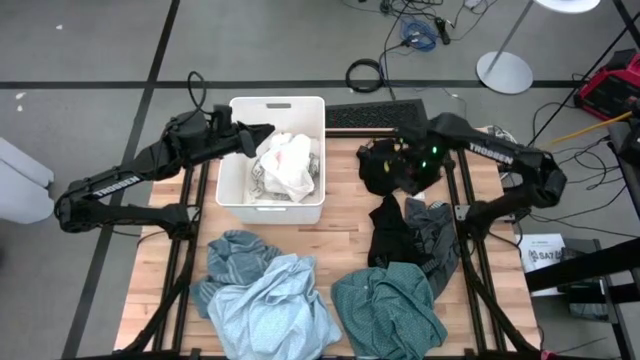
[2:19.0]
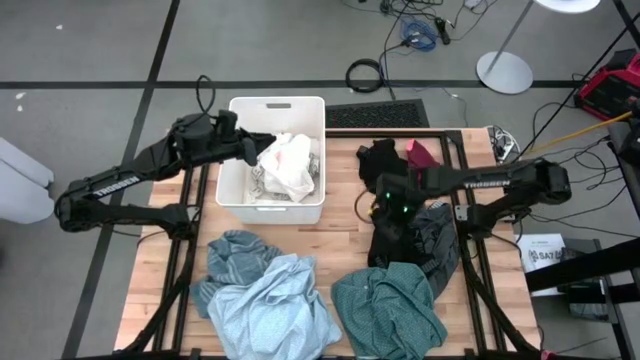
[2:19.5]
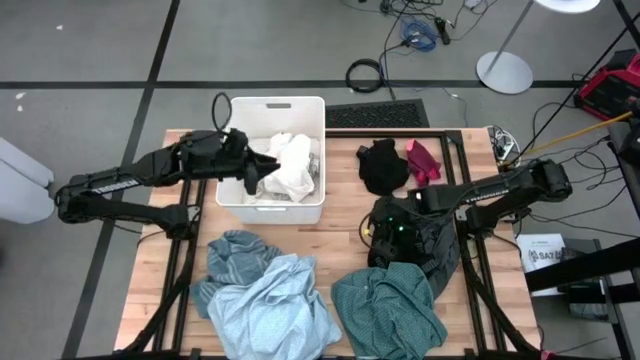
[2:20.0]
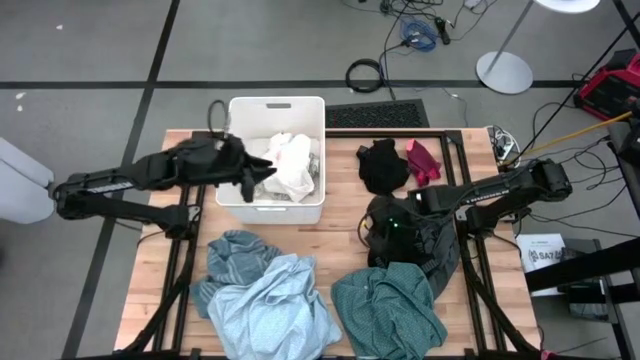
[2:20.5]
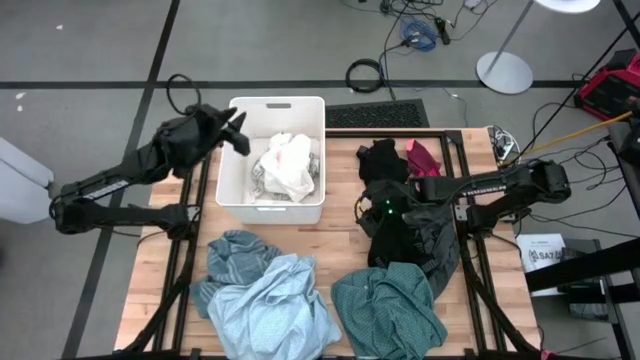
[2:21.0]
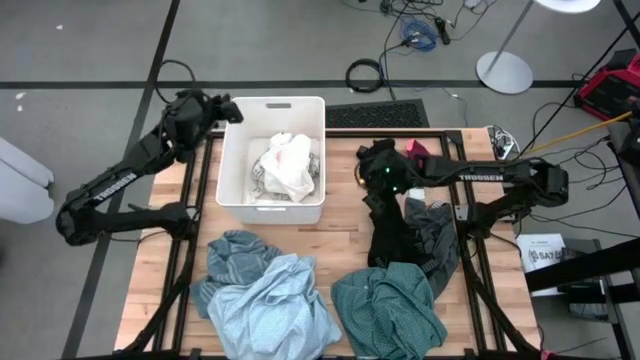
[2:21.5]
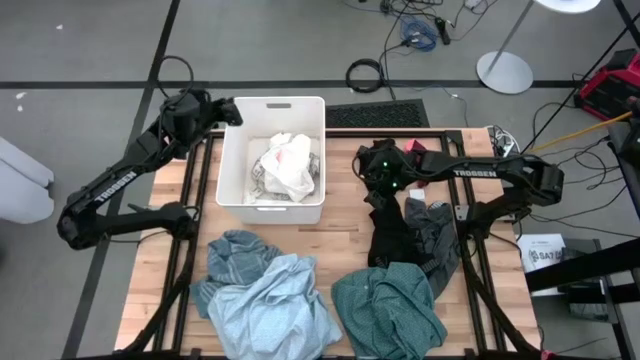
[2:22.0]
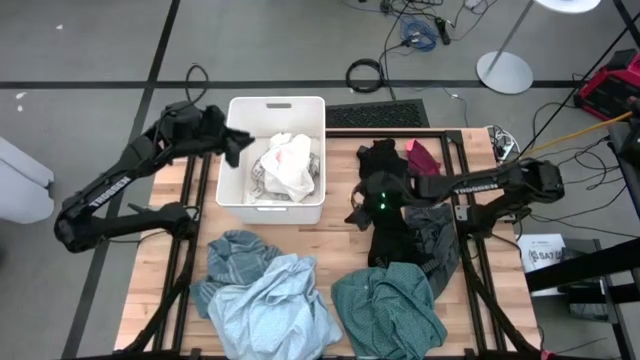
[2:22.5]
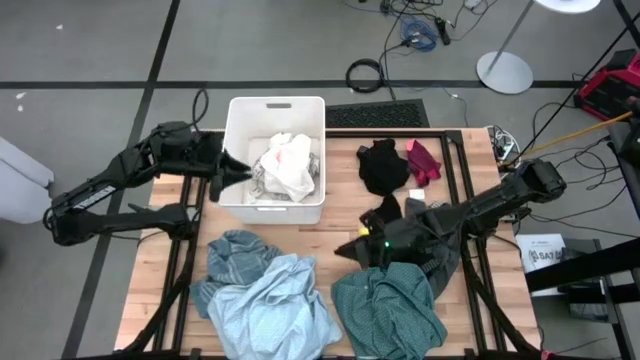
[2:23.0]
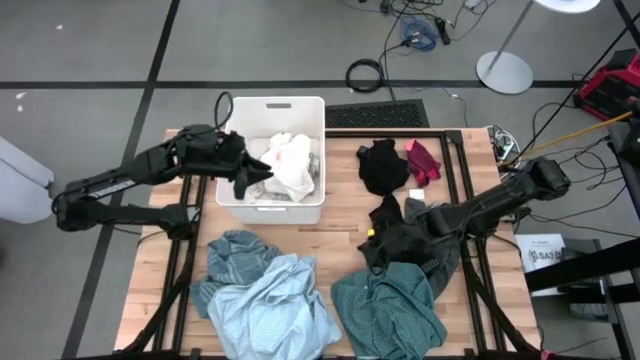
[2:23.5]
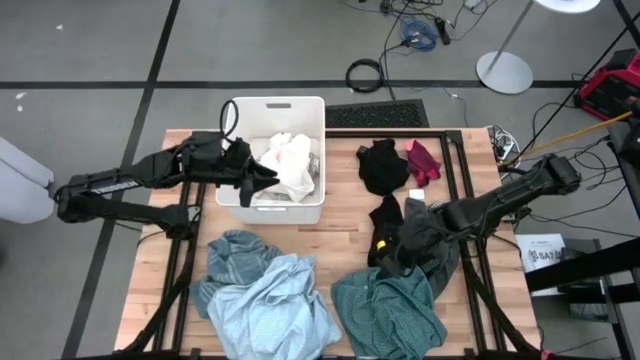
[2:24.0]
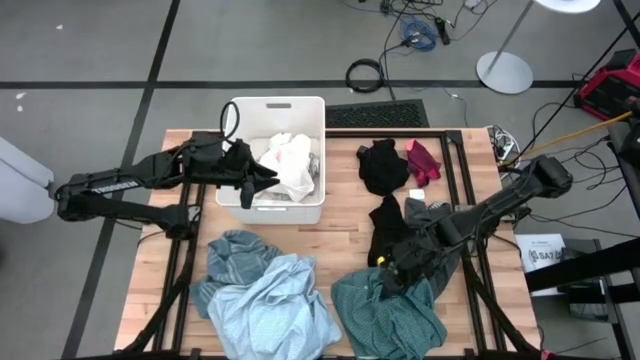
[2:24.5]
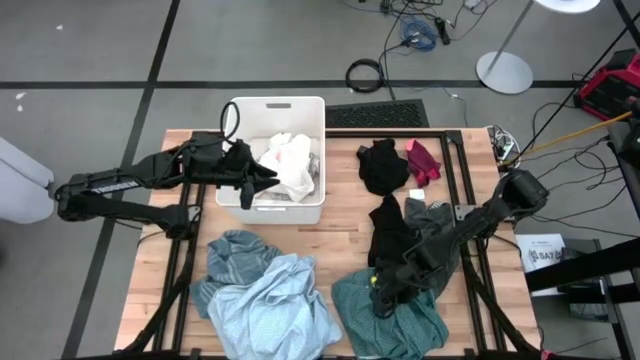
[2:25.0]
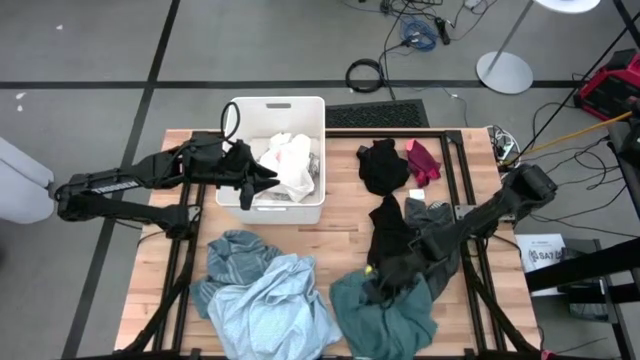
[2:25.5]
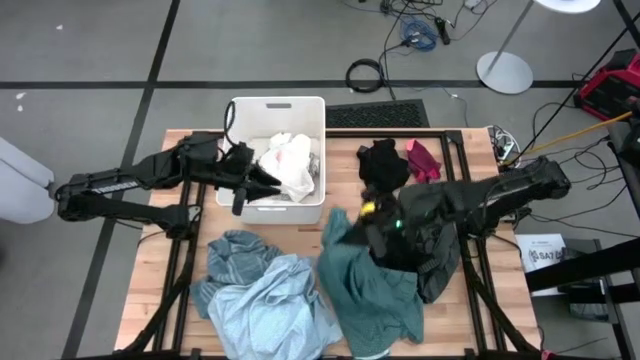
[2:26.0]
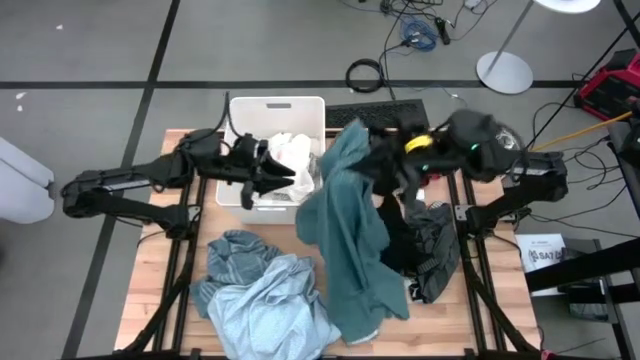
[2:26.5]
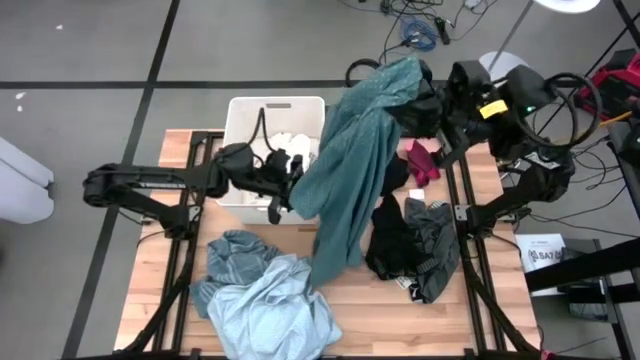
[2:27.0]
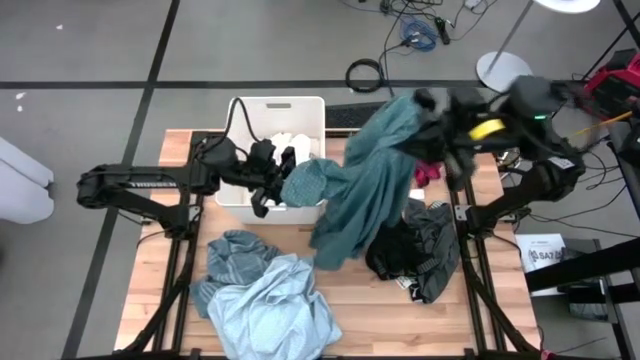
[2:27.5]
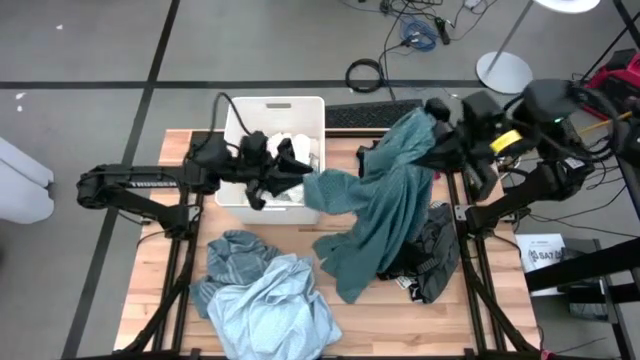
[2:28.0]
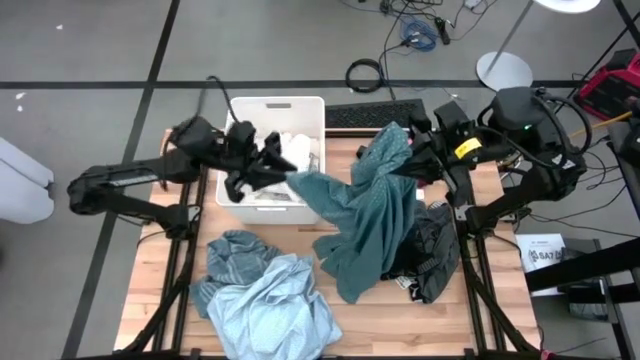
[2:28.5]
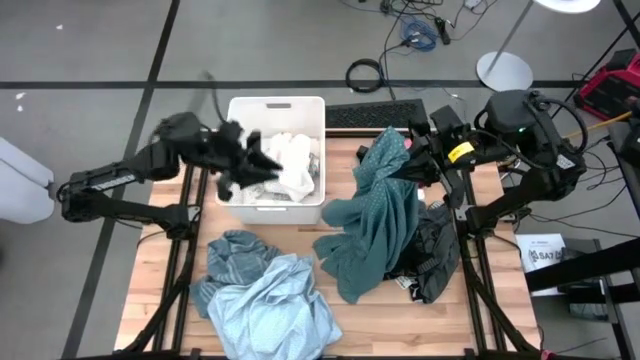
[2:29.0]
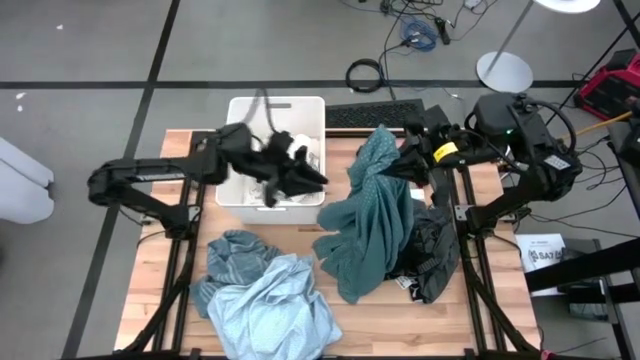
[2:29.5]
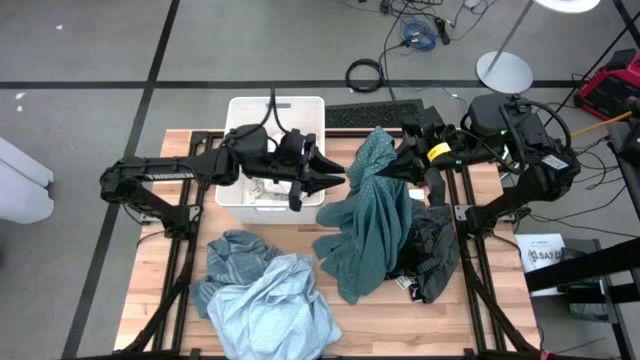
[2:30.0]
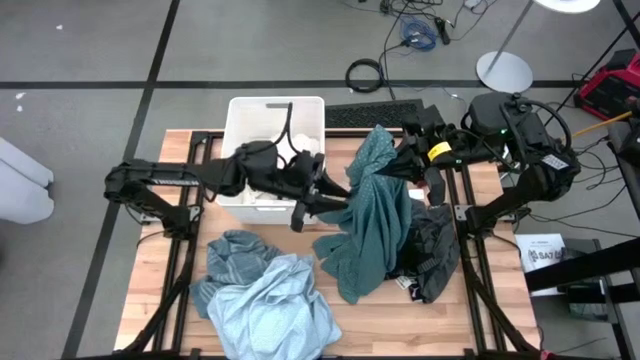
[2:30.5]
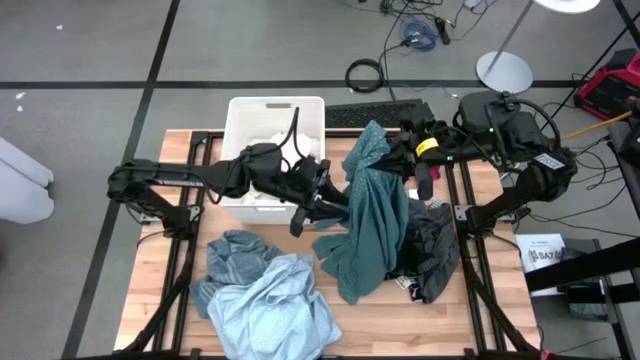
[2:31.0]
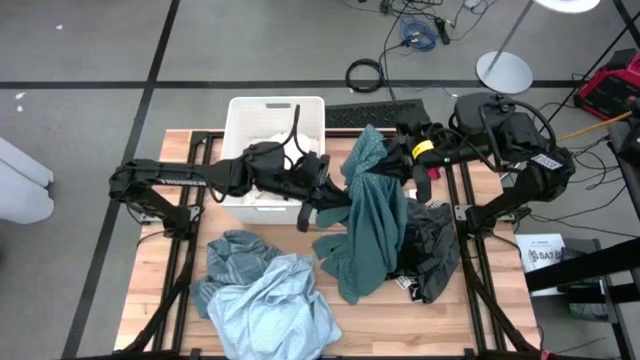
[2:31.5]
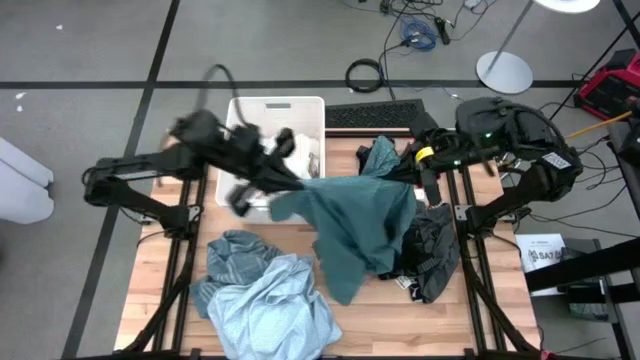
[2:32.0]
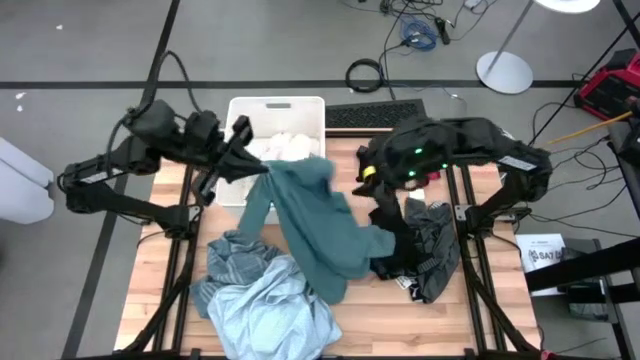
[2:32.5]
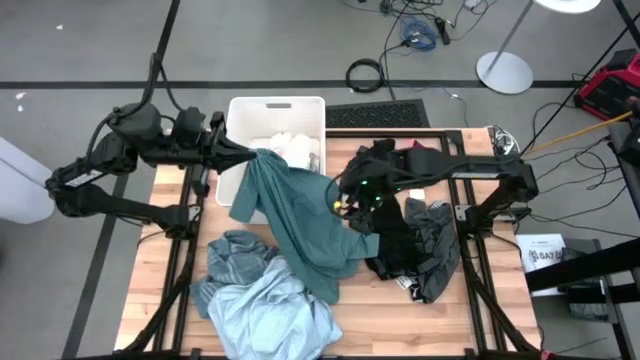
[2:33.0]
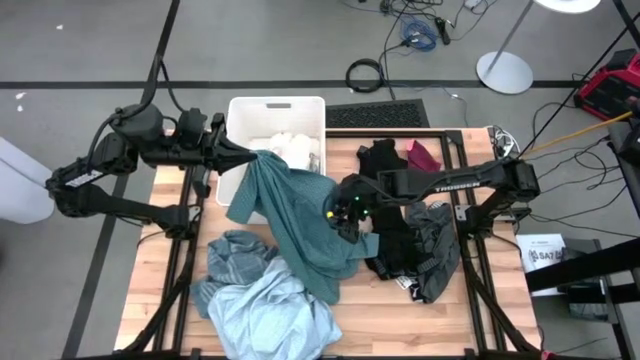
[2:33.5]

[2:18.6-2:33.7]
Task: Sort clothes
Put the green shirt into the white laundry bin

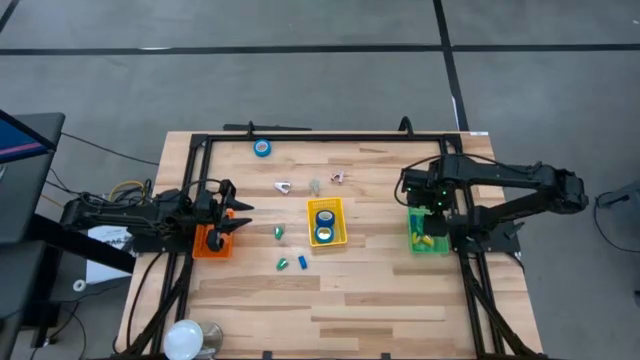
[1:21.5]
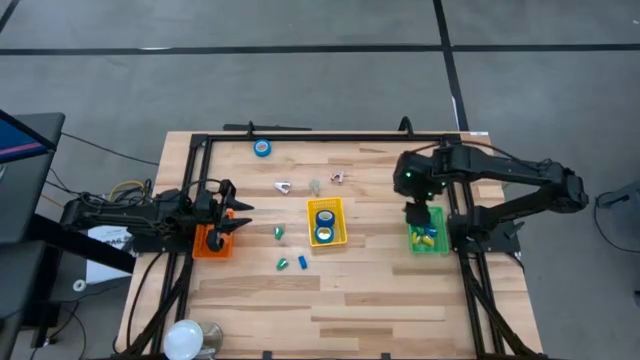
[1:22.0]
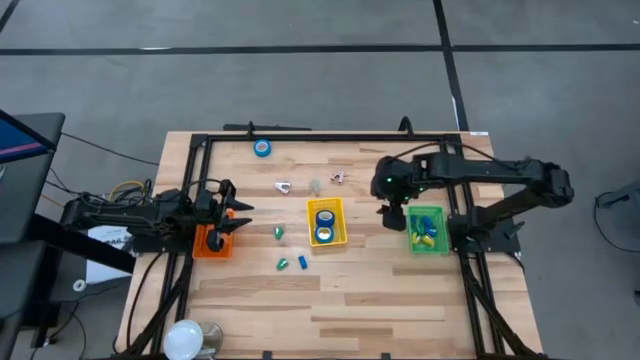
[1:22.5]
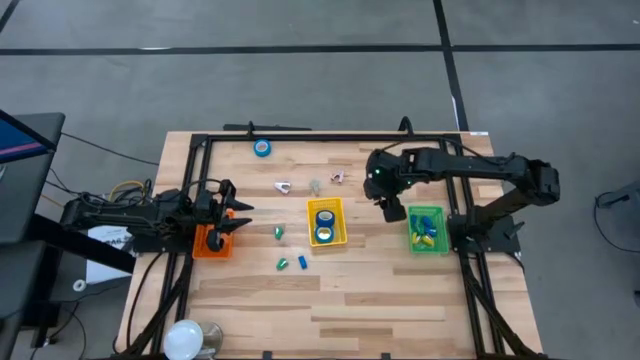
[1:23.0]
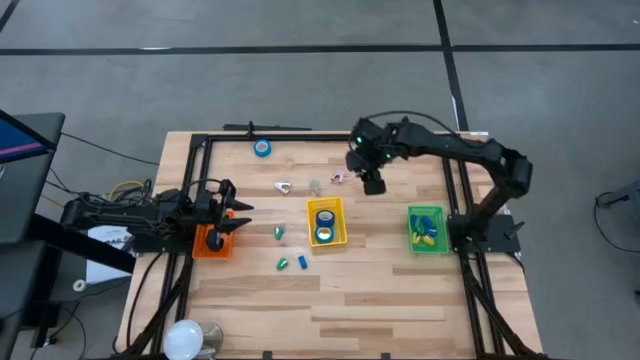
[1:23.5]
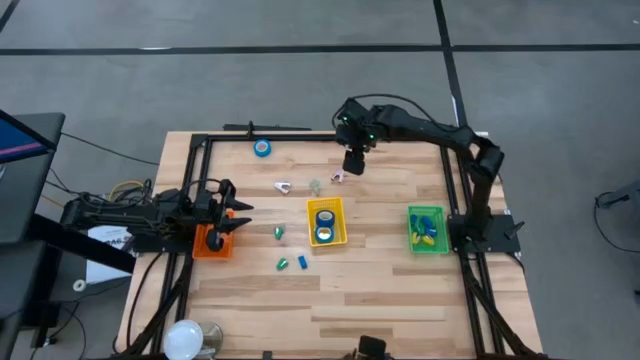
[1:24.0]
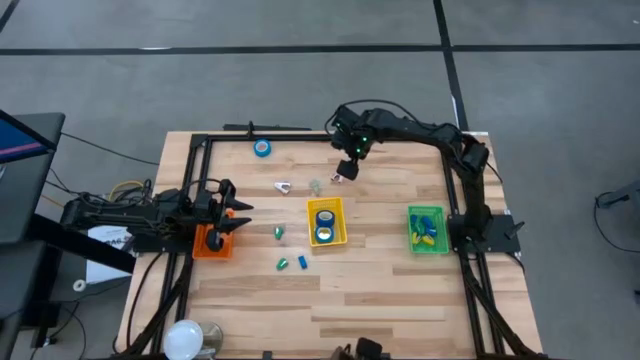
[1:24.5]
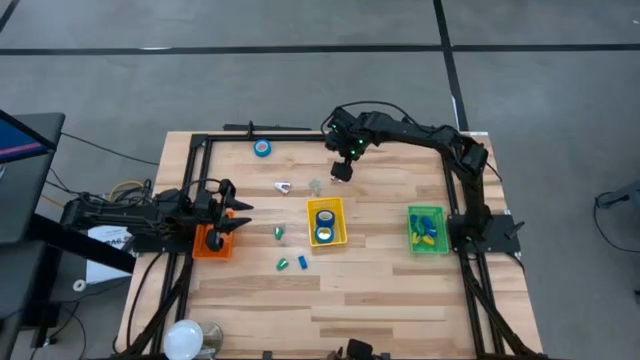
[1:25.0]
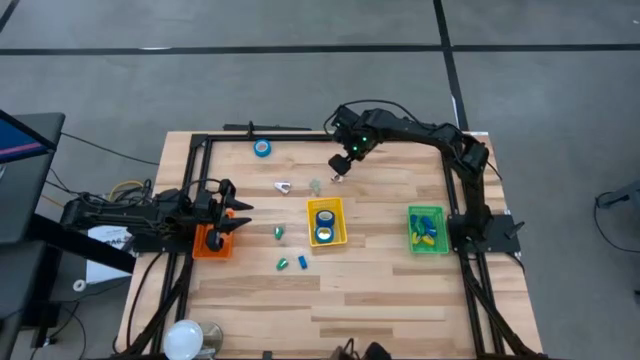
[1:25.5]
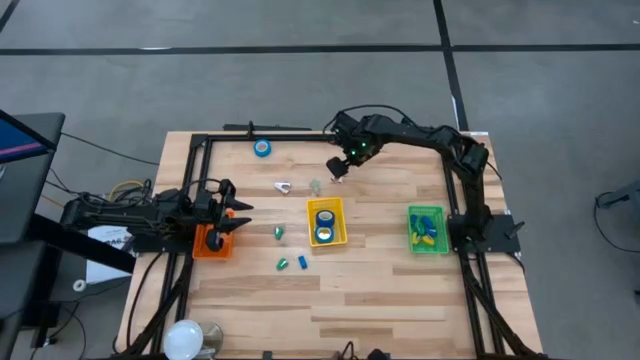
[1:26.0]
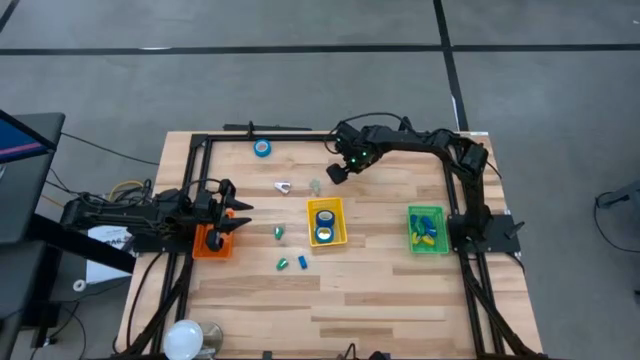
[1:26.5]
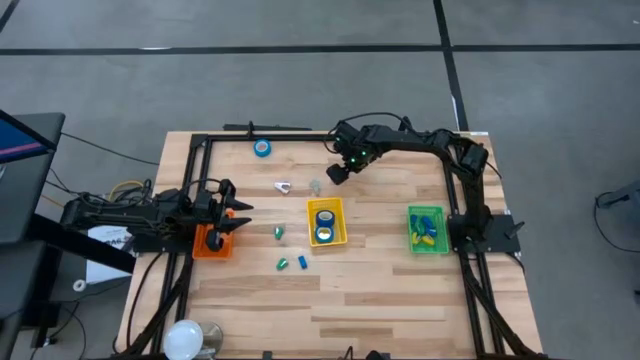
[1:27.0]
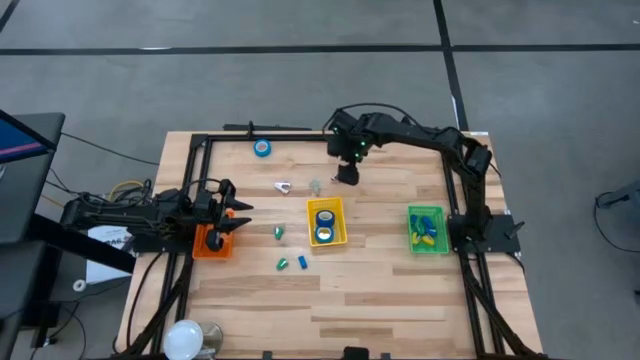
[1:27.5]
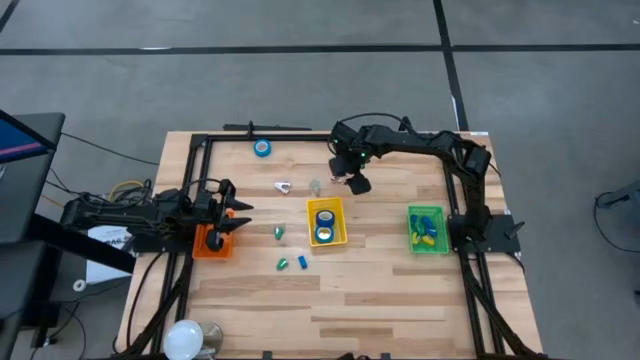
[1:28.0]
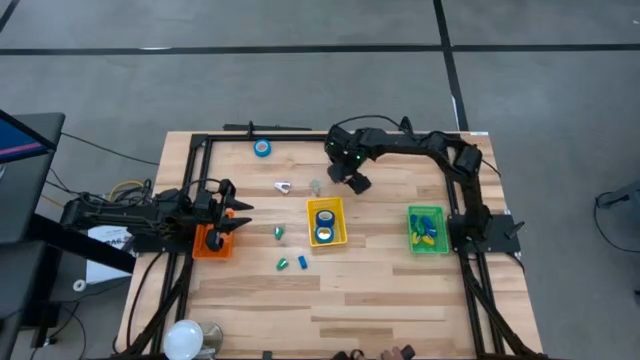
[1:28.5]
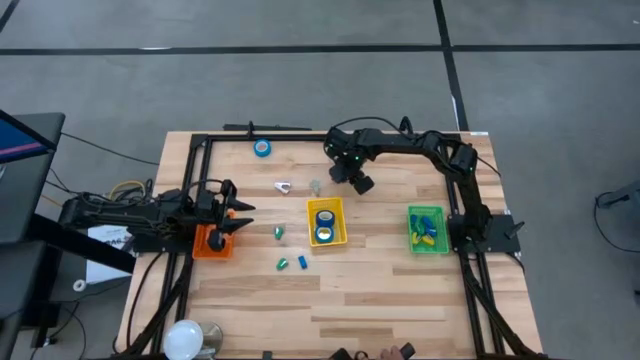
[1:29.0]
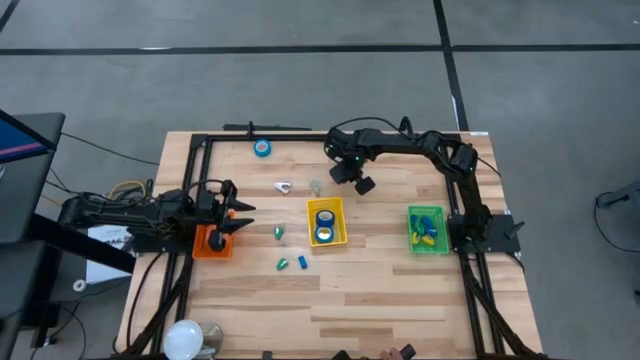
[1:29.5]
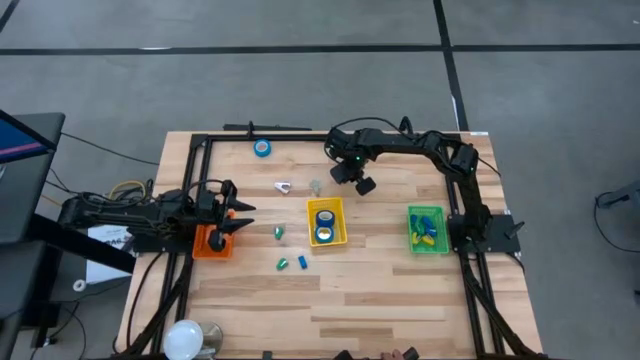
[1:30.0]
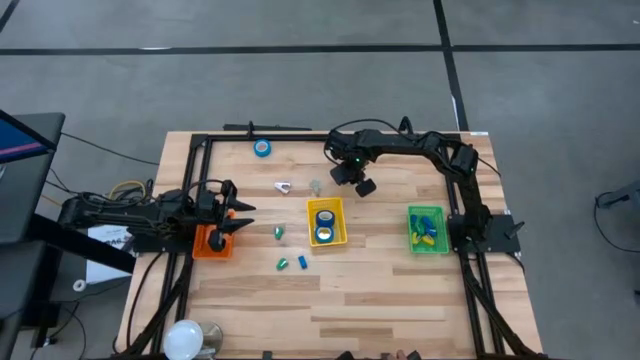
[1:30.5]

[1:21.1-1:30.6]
Task: Pick and place Stapler, Stapler remover, tape
Put the pink staple remover into the orange basket
